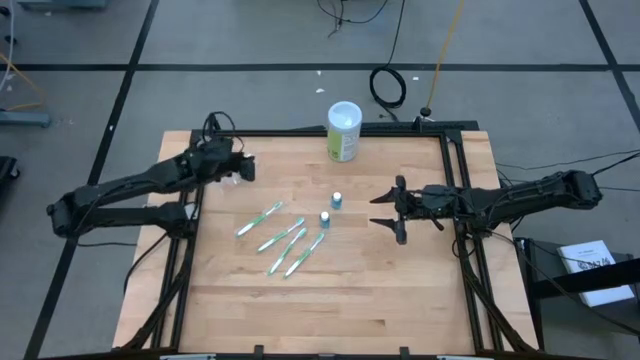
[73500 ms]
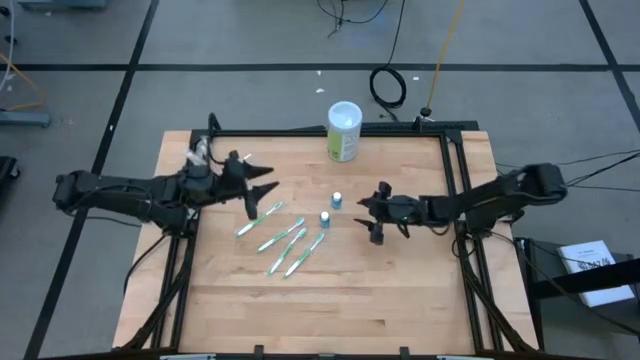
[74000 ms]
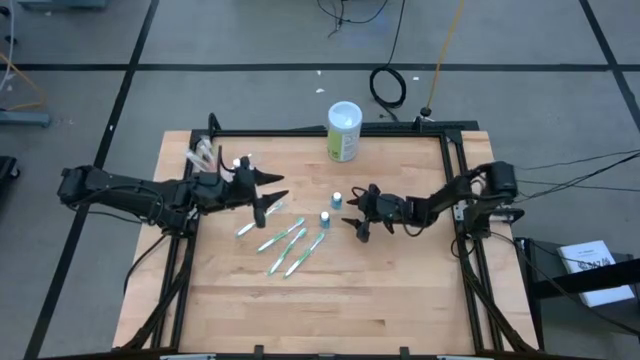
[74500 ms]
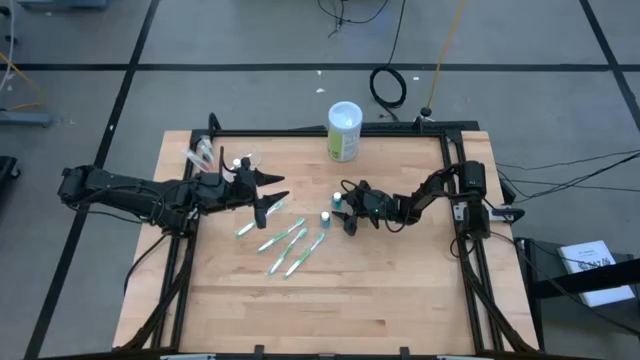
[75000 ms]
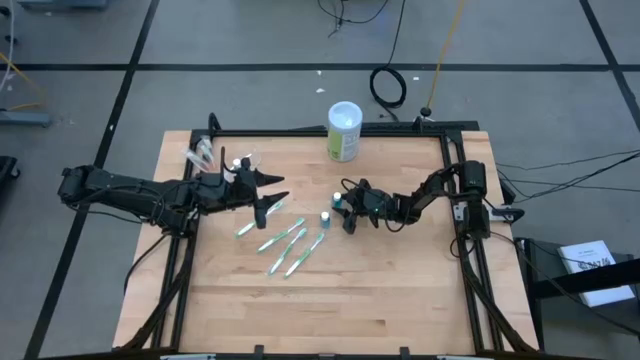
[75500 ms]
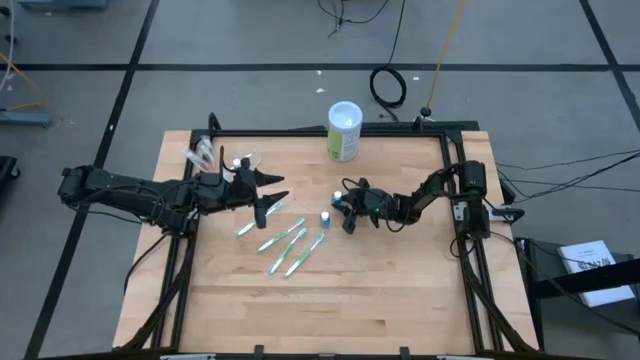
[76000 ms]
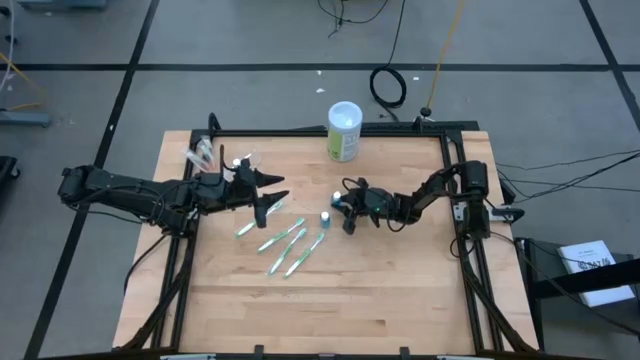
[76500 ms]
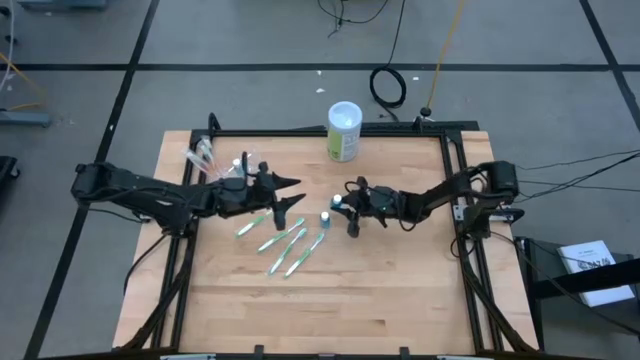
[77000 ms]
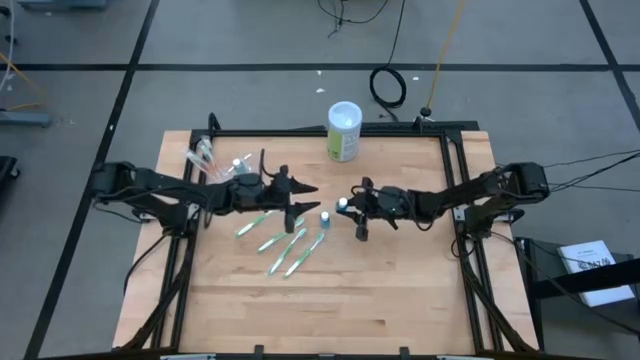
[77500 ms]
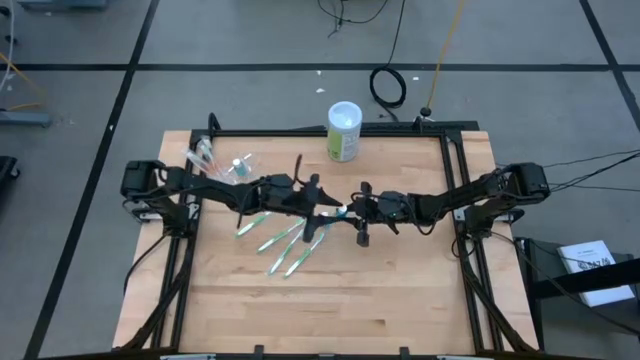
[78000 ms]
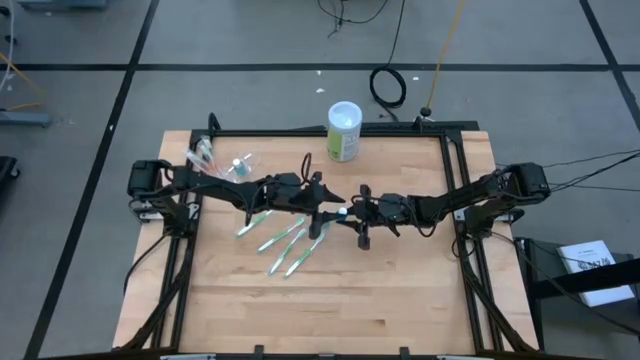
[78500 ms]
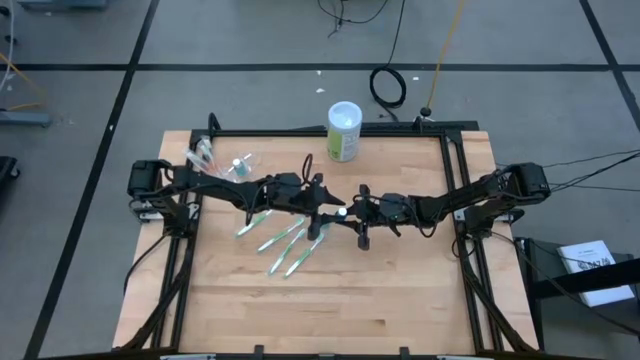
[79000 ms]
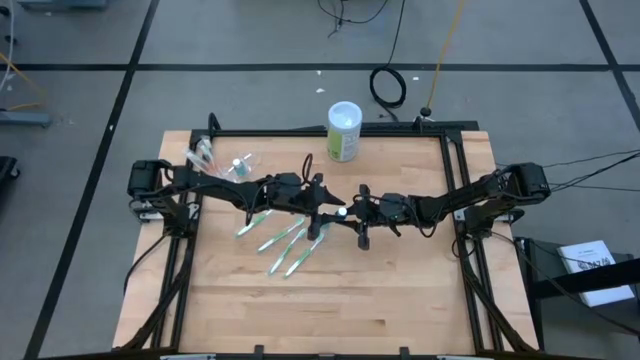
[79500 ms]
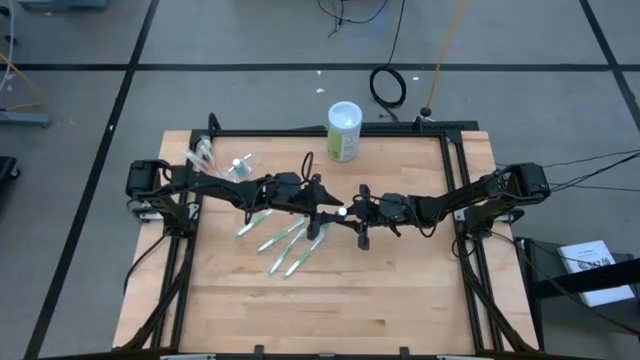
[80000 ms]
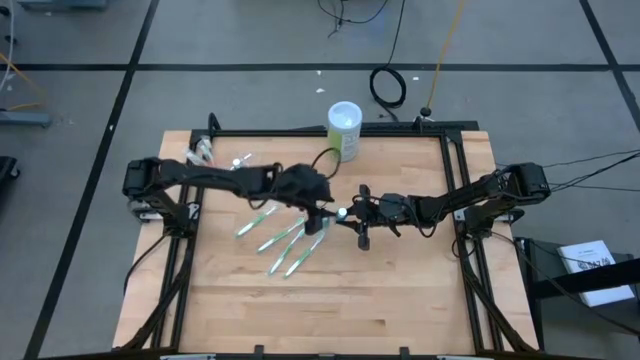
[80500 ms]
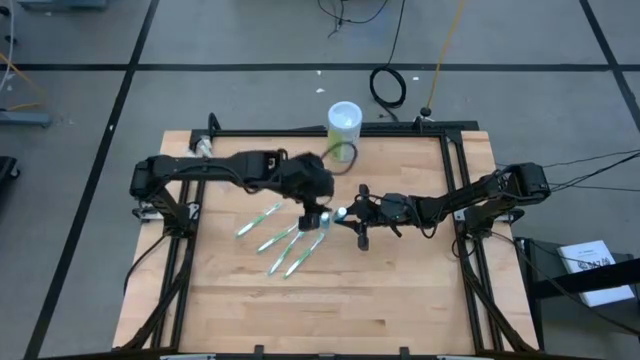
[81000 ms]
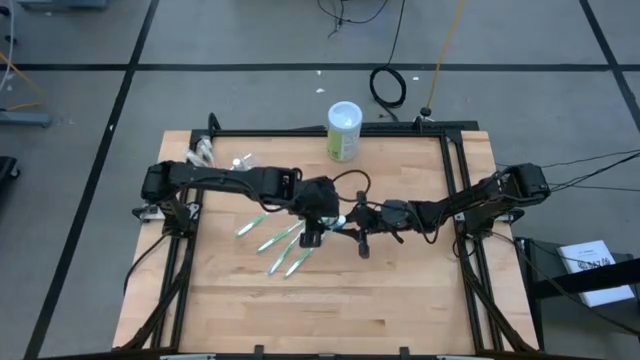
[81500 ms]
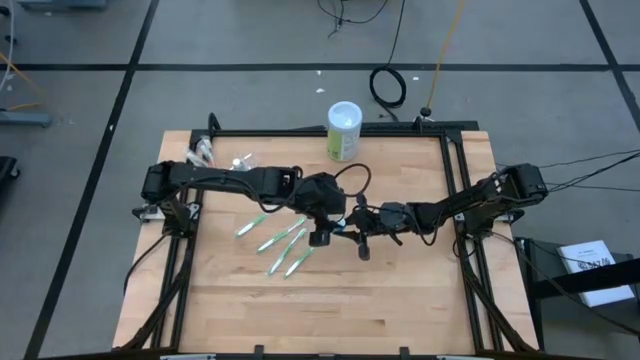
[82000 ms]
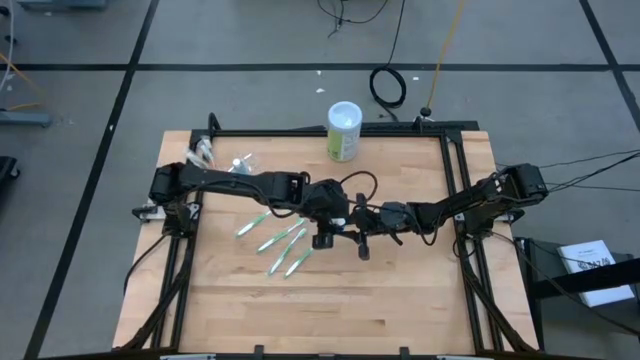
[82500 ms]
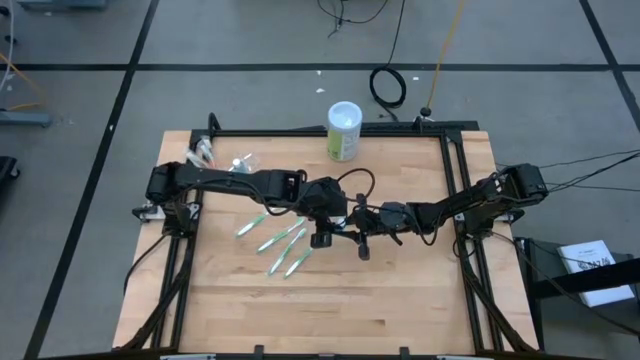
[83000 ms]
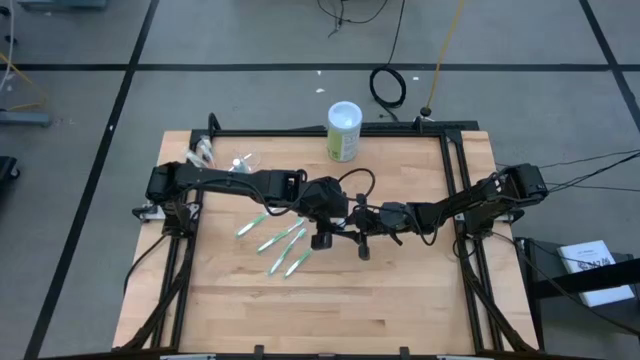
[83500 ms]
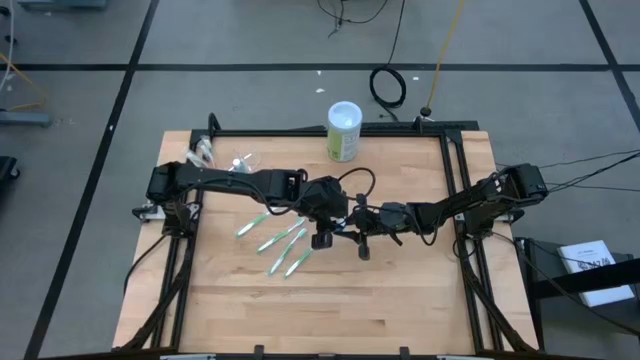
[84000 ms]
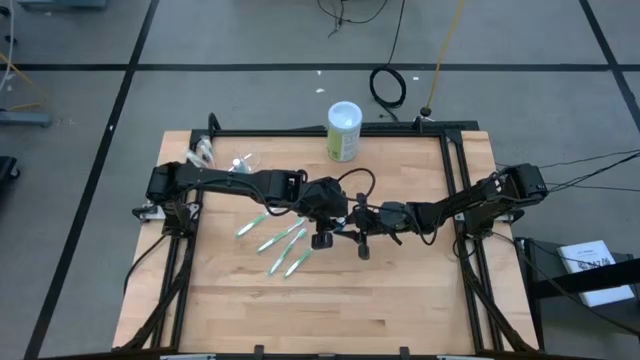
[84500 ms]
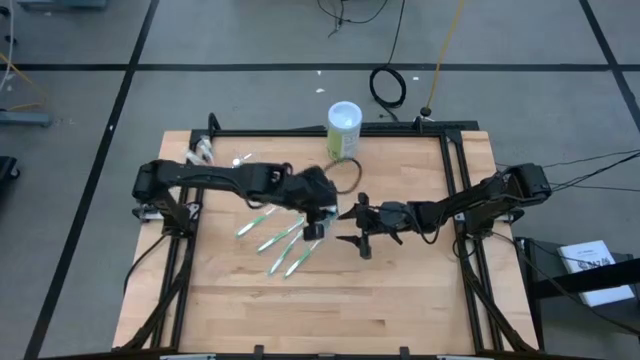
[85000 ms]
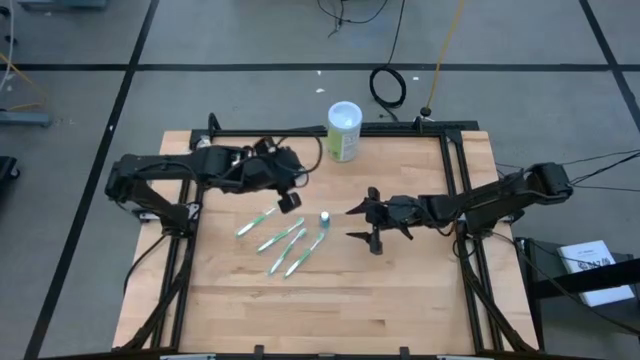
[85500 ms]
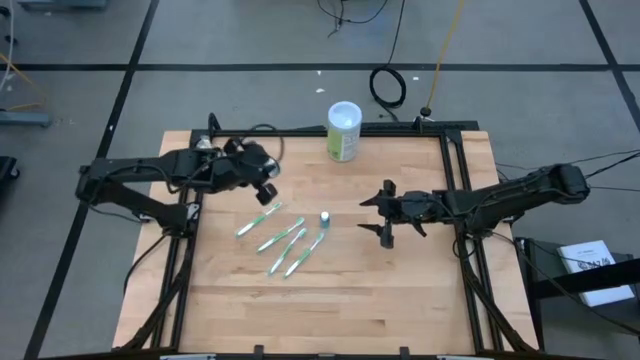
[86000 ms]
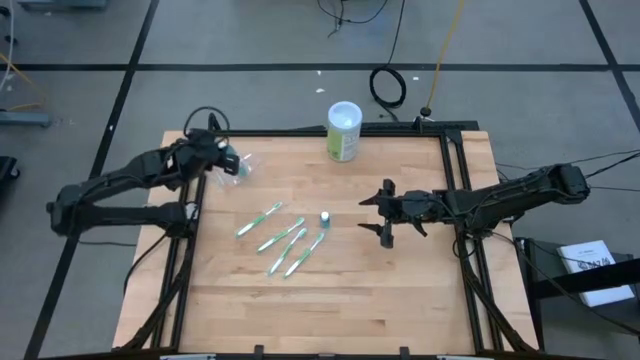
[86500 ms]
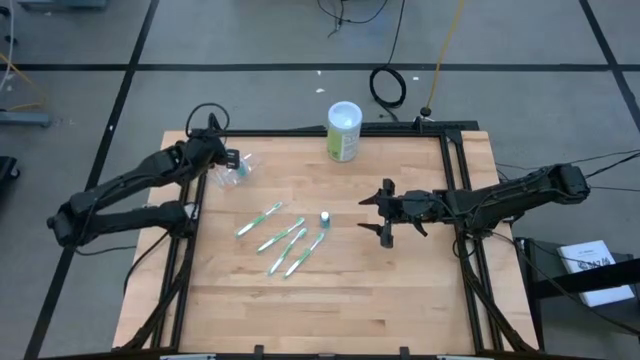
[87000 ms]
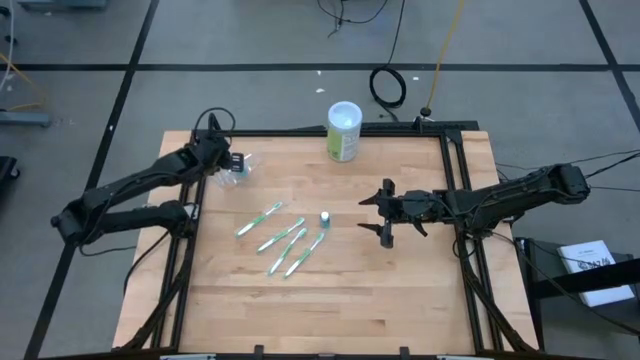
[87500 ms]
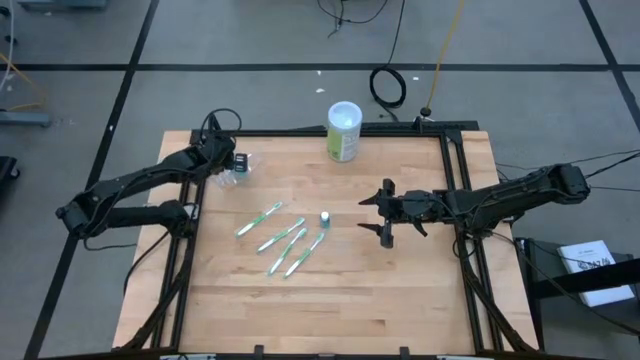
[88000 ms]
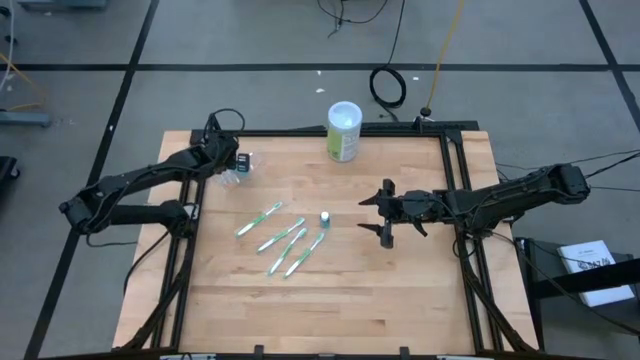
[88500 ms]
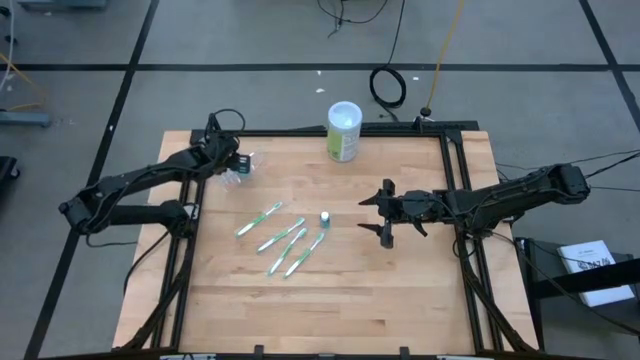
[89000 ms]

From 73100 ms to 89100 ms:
Task: Pick & Place toothbrushing station
Put the blue mouthwash into the middle section of the transparent organizer

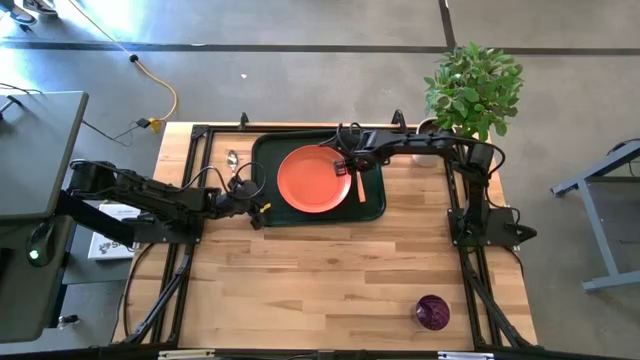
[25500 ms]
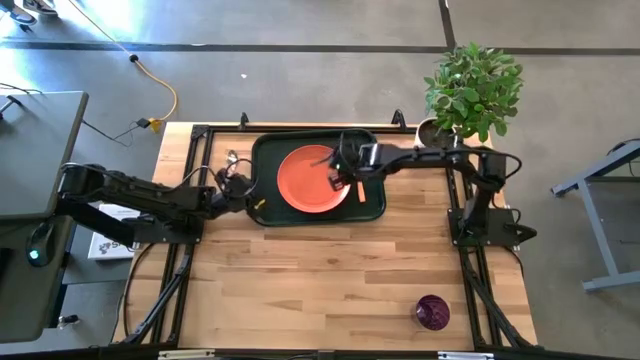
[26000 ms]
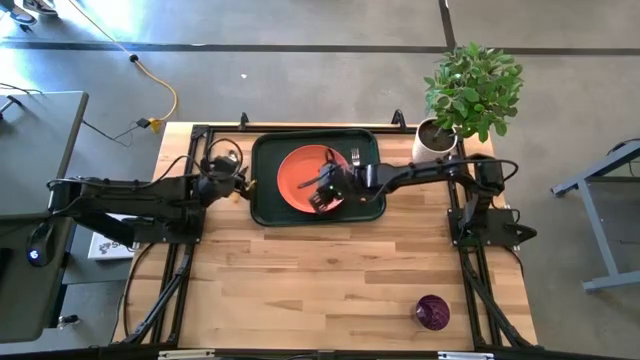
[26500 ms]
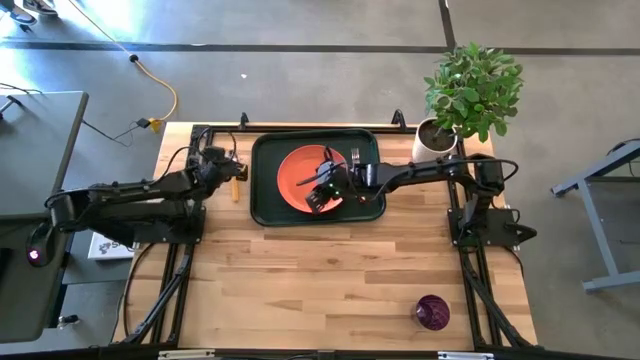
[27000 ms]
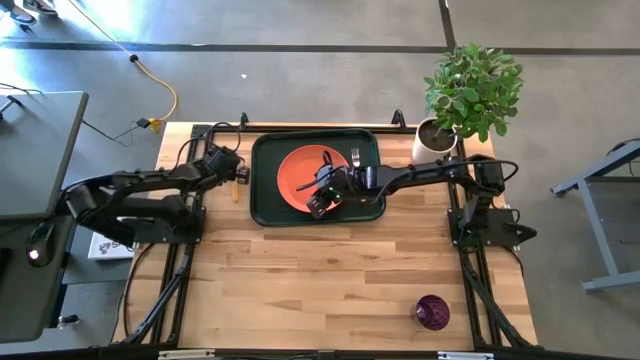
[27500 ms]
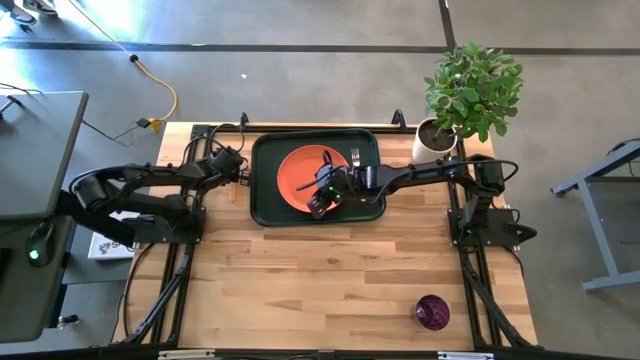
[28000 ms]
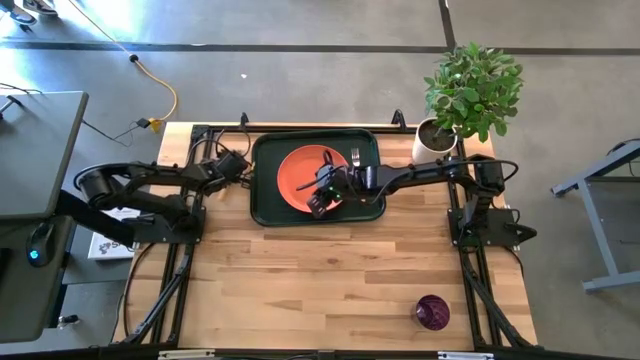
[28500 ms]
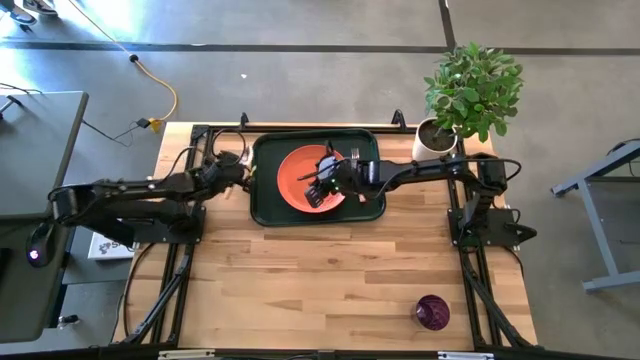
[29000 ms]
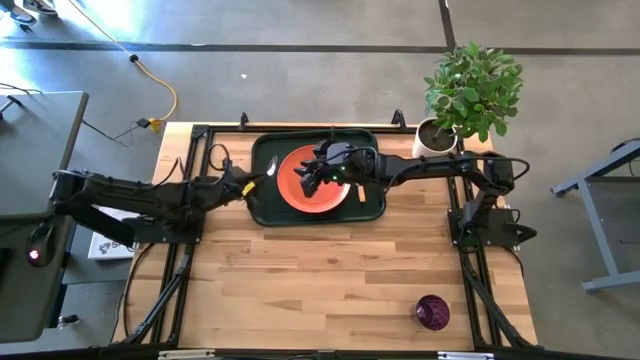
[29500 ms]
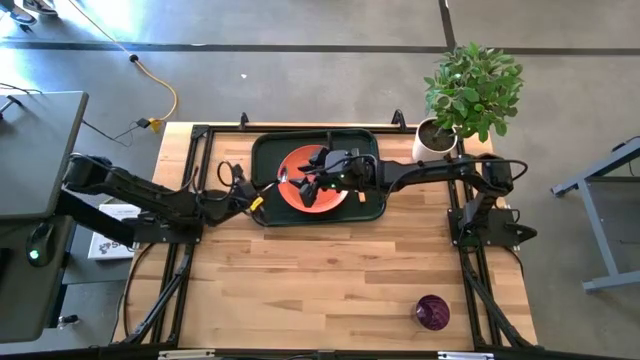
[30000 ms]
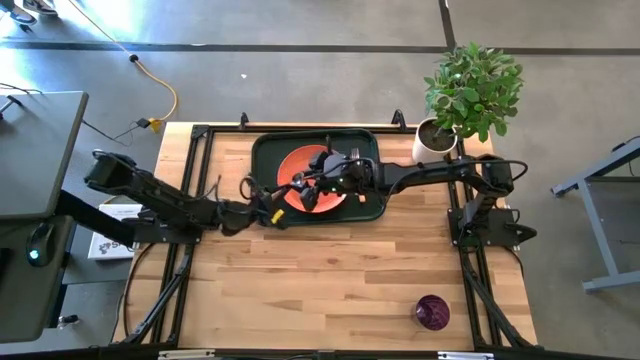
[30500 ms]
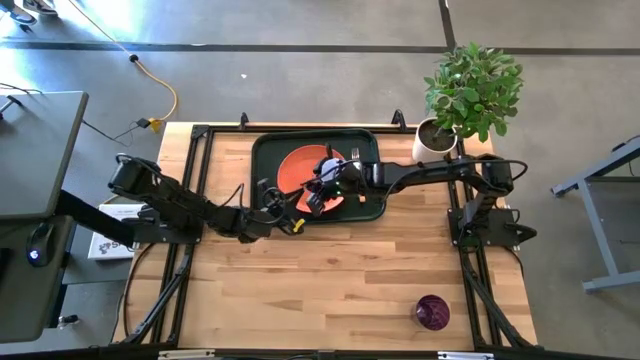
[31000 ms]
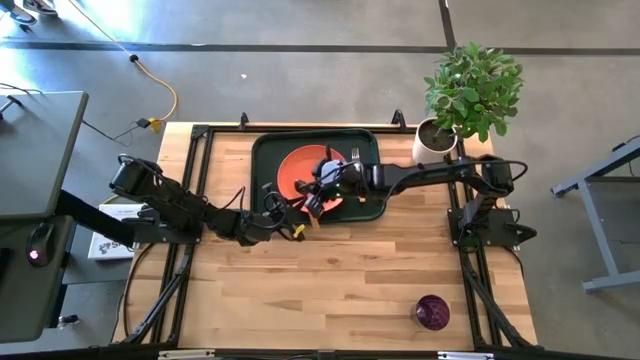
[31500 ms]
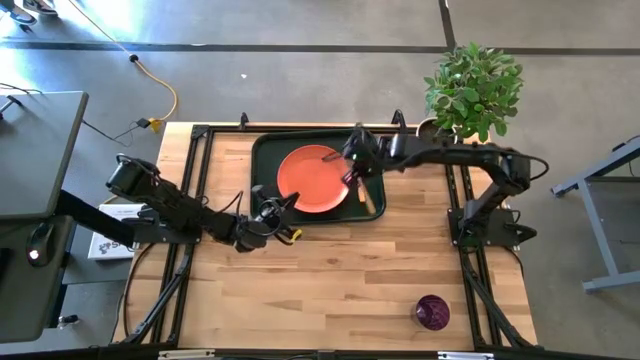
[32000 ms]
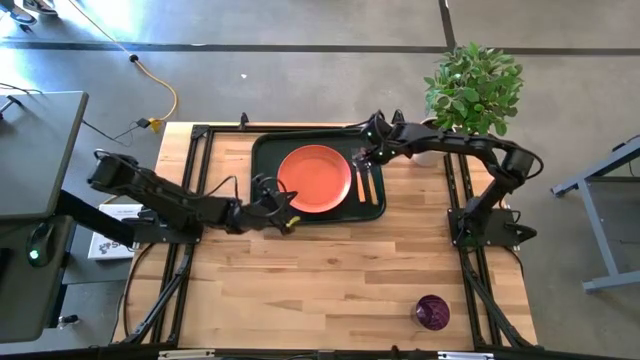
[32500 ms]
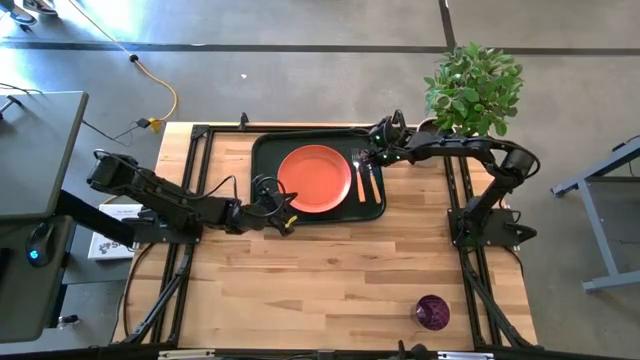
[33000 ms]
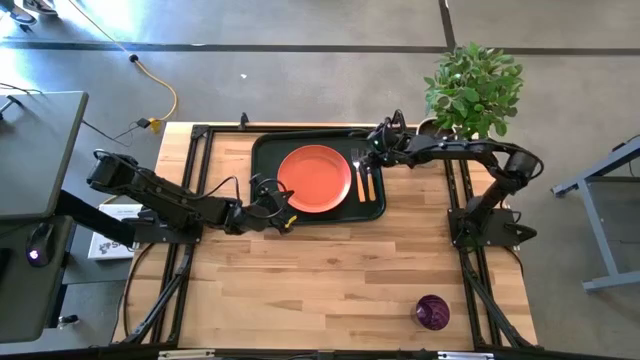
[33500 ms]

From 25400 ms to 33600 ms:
Task: Pick and place plate/cup/fork/spoon on tray
Put the orange spoon on the black tray to the right of the orange plate
